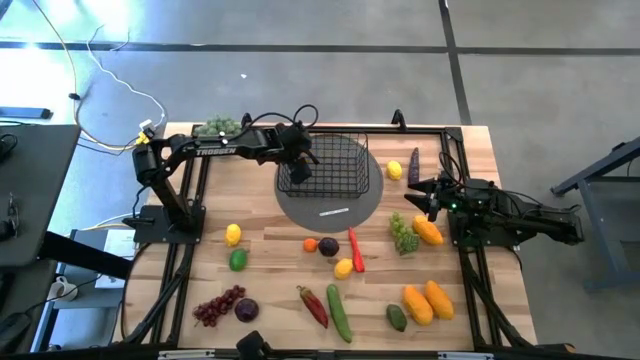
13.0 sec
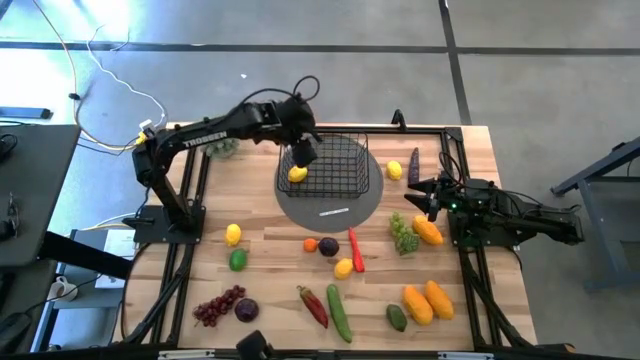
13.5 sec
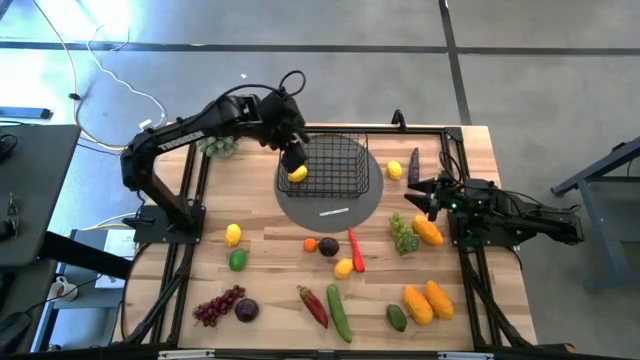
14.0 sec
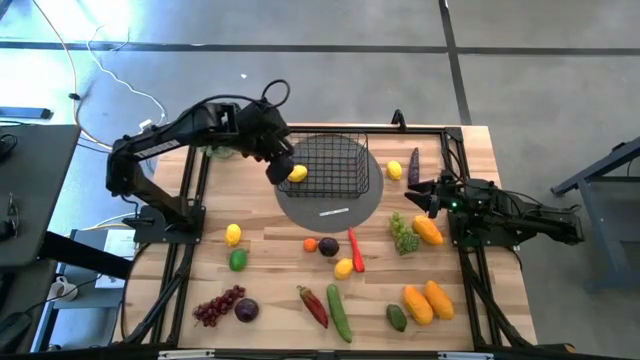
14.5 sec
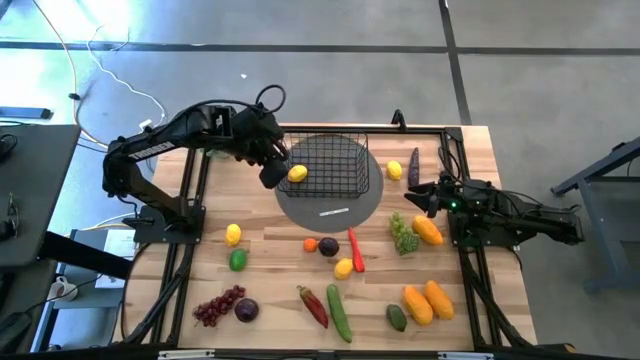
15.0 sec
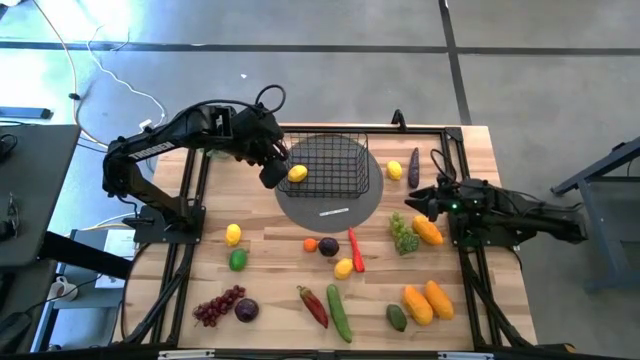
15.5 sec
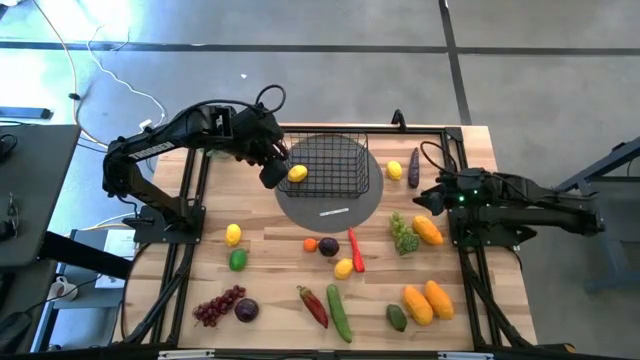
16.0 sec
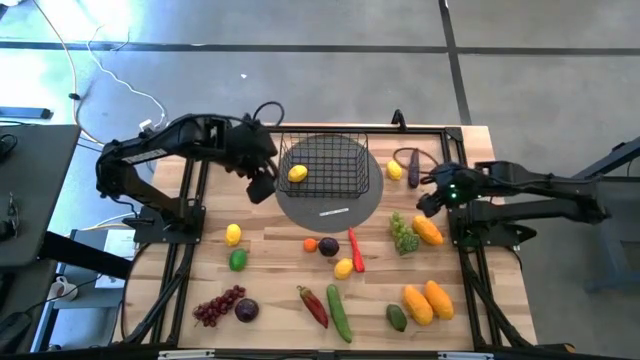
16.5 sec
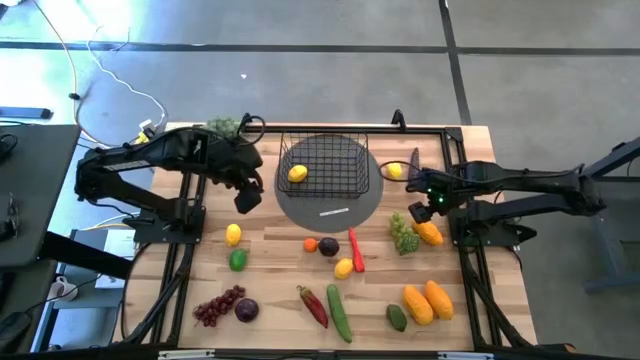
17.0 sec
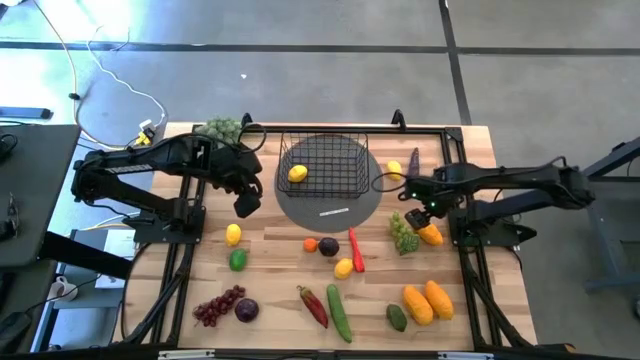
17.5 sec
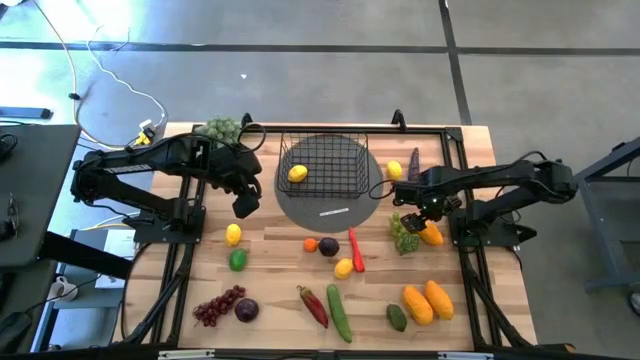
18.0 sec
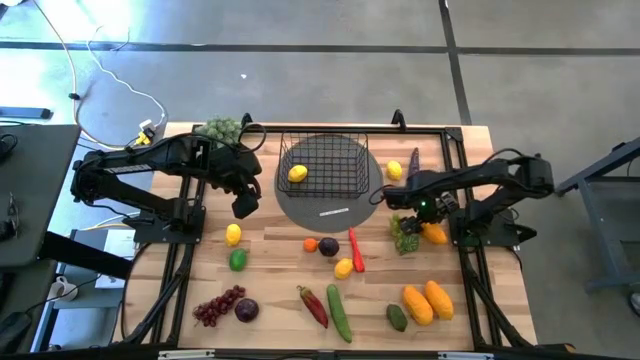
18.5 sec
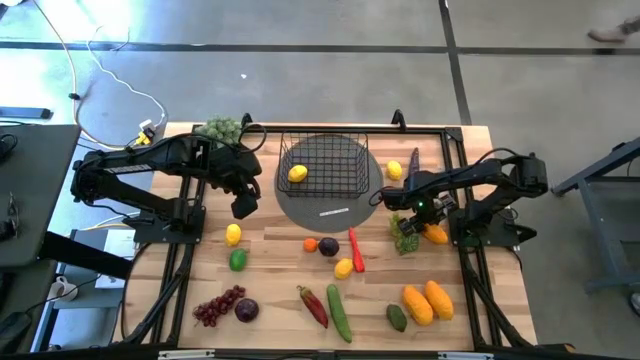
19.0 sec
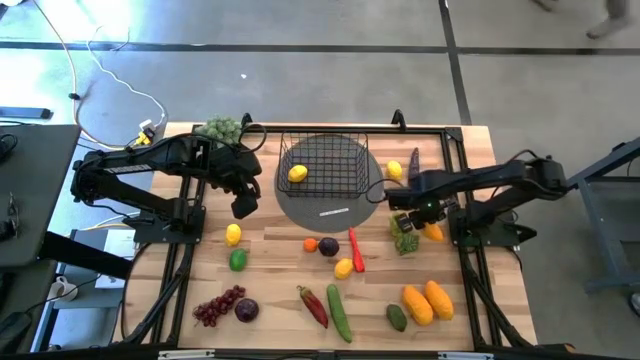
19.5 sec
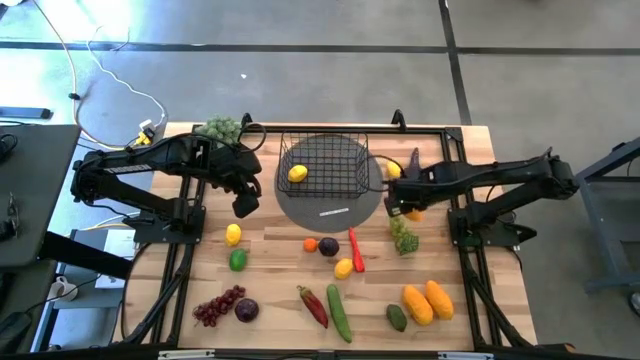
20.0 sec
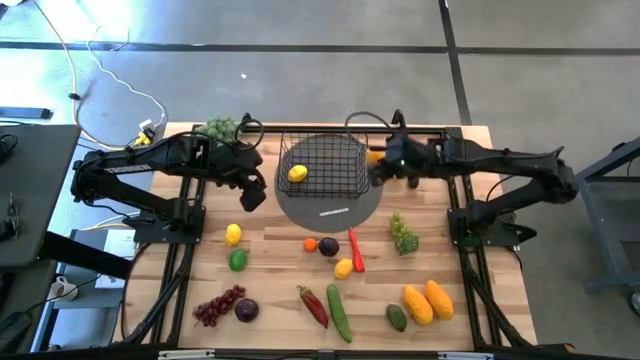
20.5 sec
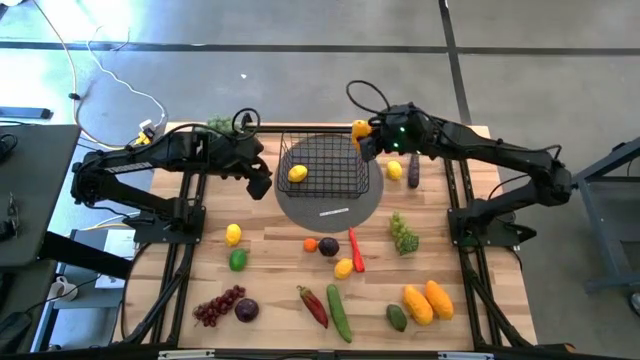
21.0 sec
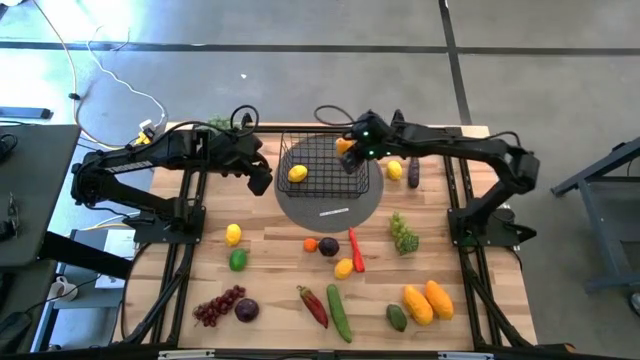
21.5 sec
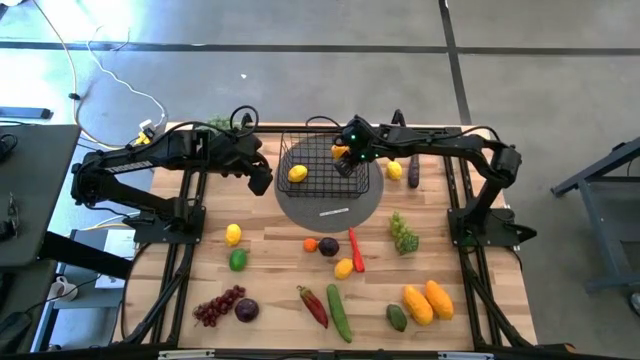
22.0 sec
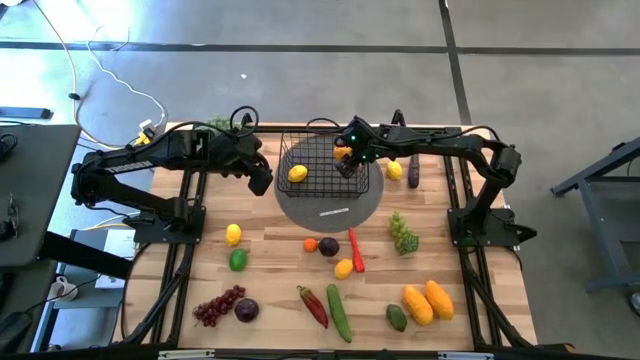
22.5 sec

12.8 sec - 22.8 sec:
Task: Build produce basket
Put the mango into the black wire basket

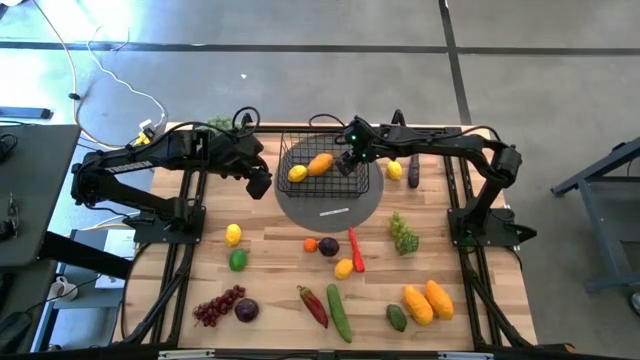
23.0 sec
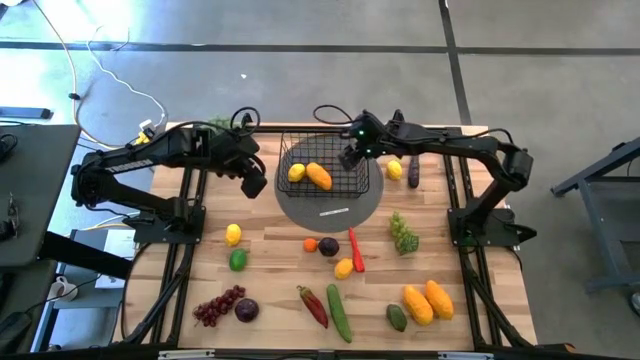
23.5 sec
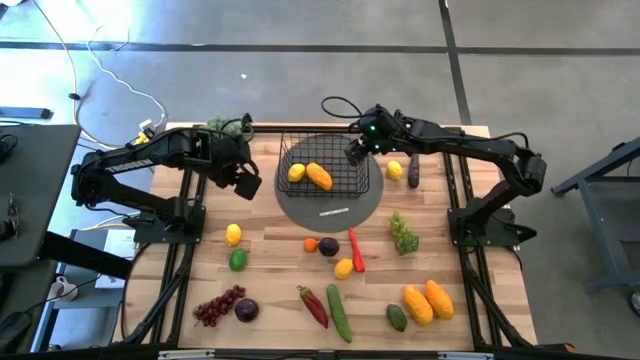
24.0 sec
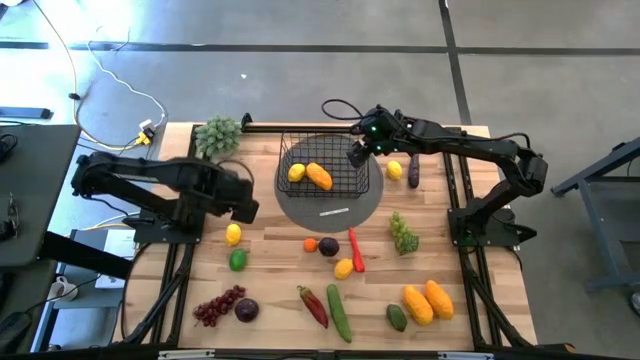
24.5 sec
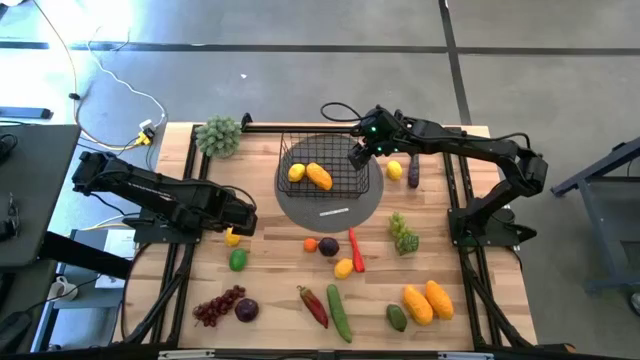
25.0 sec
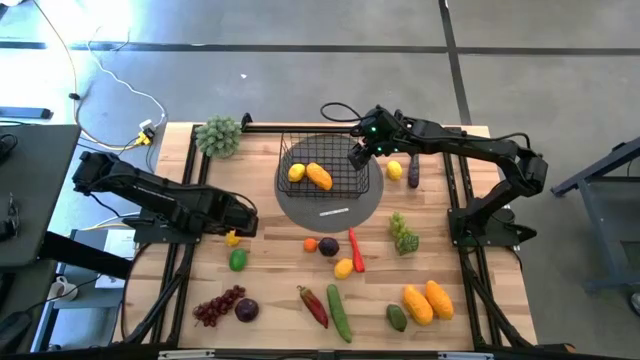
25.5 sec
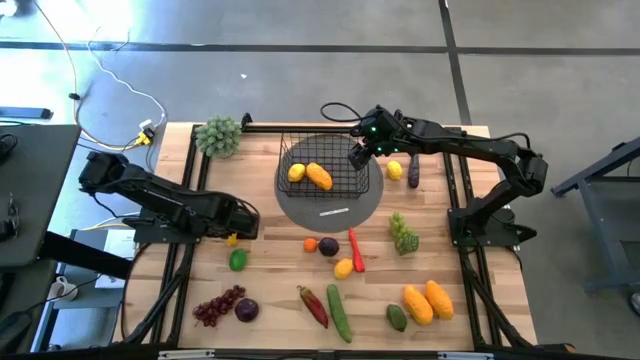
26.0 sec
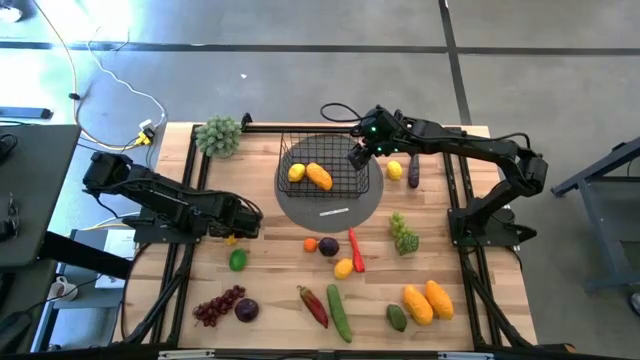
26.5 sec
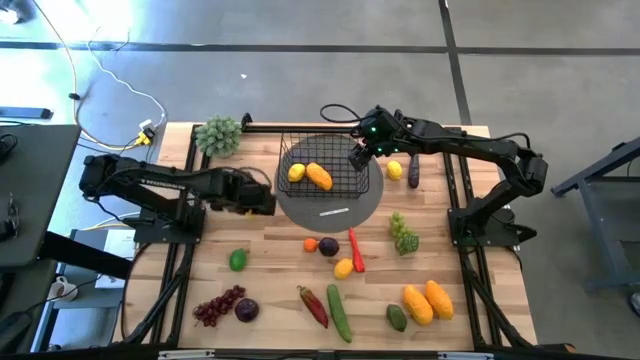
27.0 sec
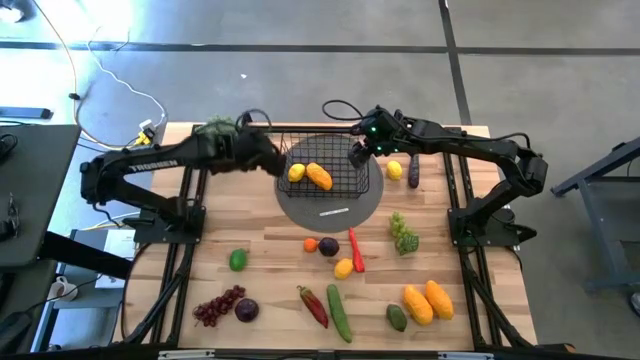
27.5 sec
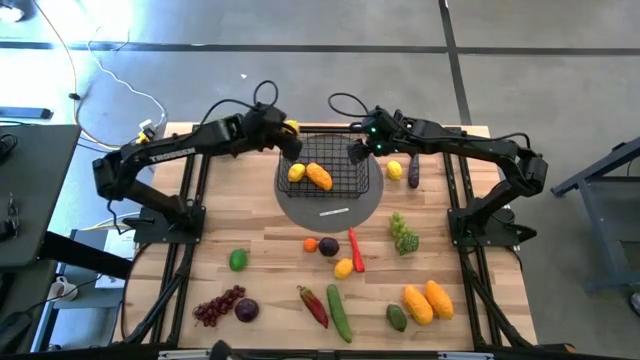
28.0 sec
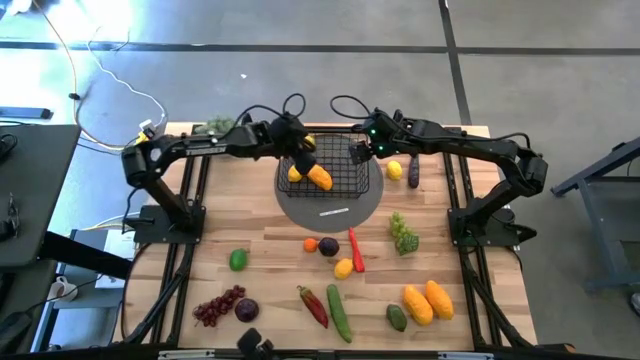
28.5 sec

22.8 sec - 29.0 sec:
Put the lemon into the black wire basket

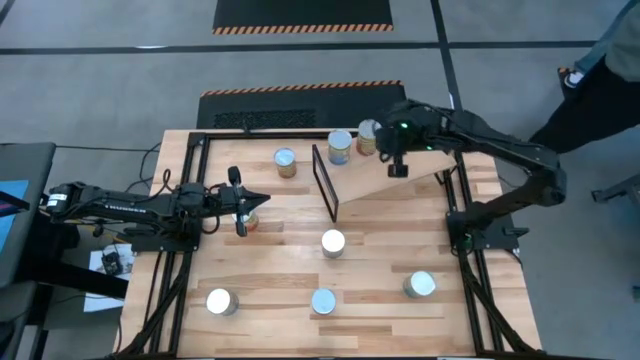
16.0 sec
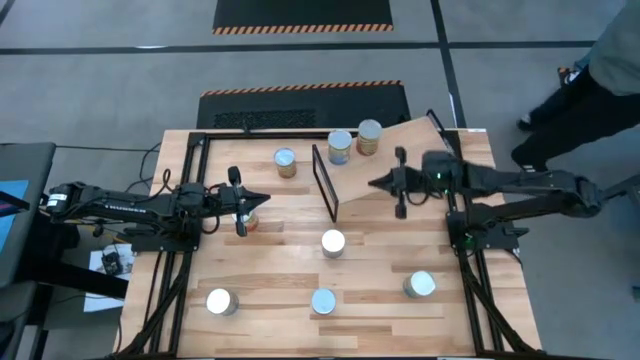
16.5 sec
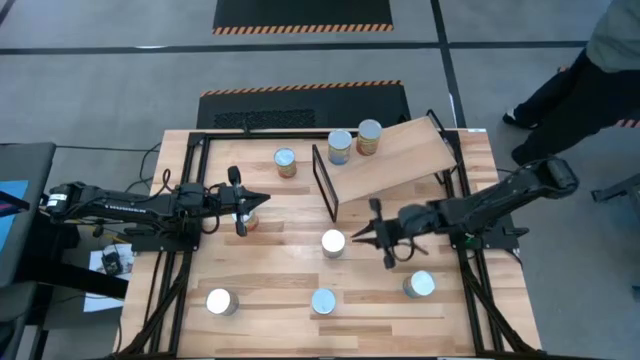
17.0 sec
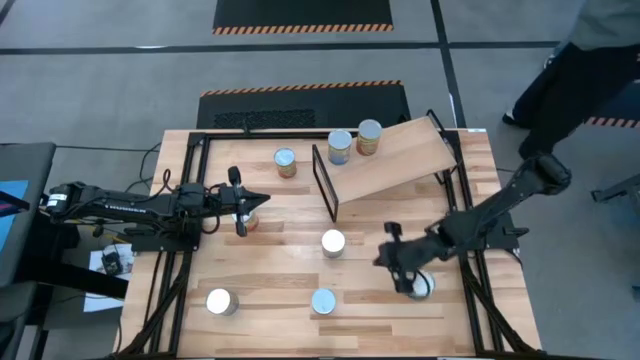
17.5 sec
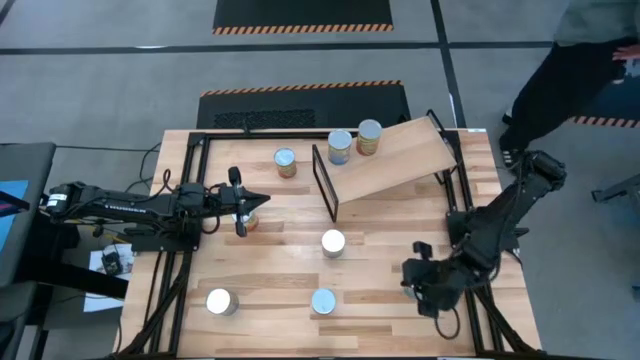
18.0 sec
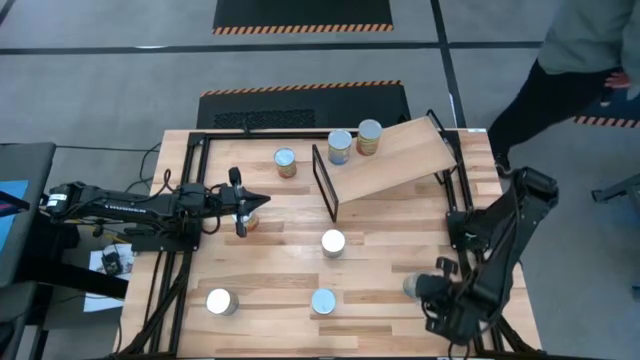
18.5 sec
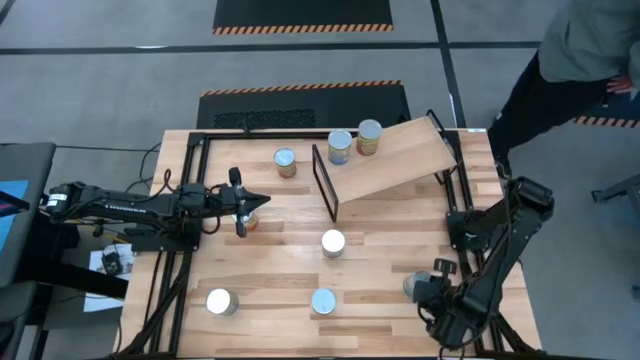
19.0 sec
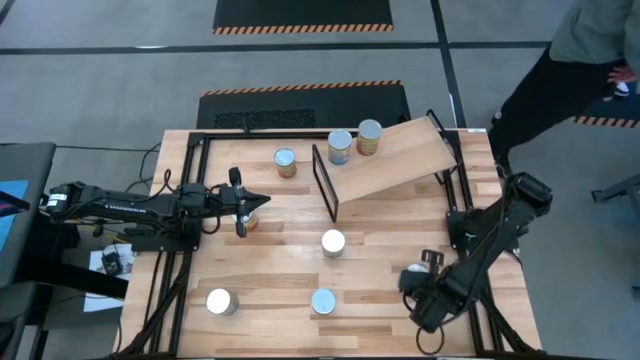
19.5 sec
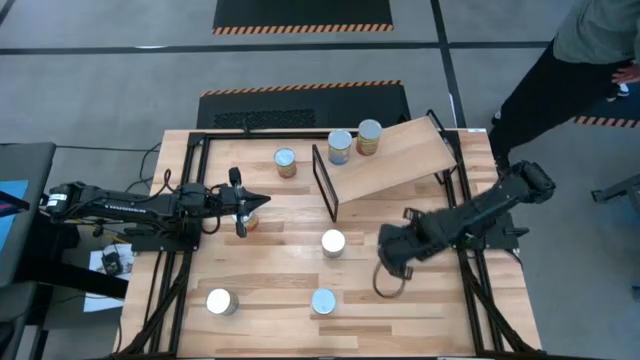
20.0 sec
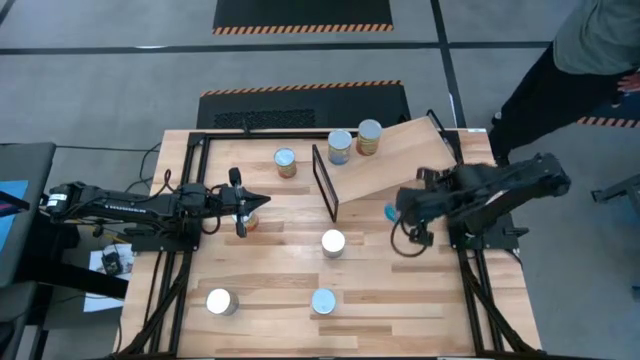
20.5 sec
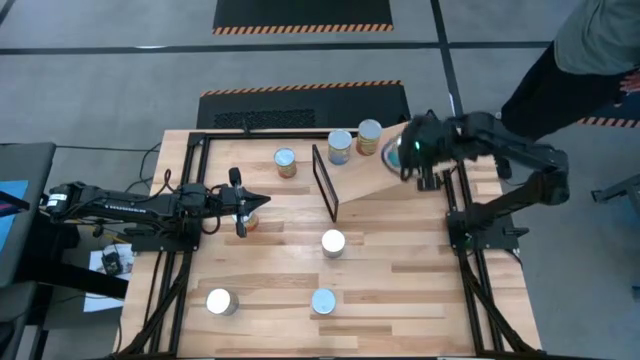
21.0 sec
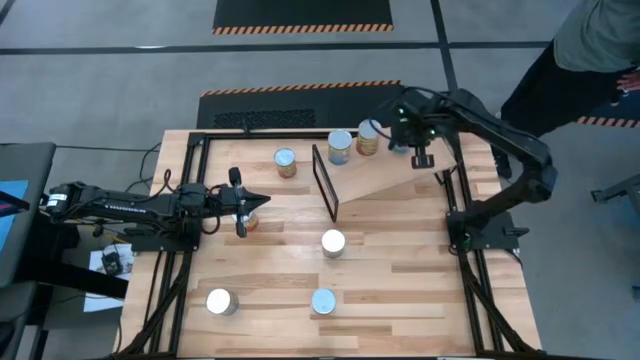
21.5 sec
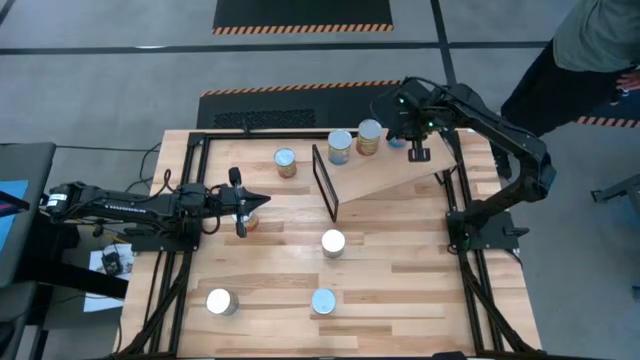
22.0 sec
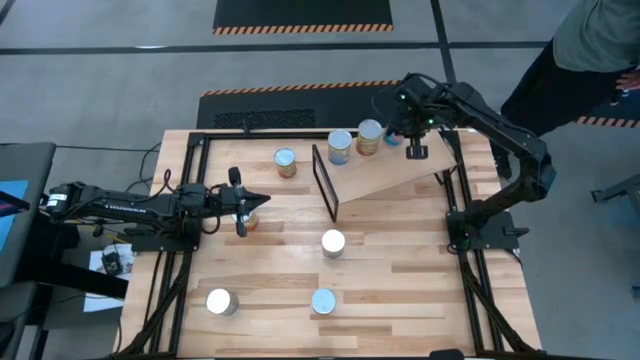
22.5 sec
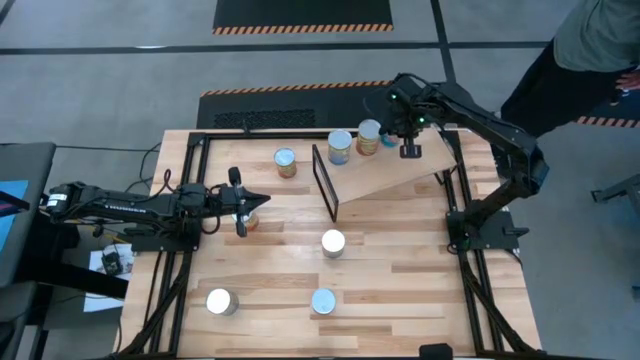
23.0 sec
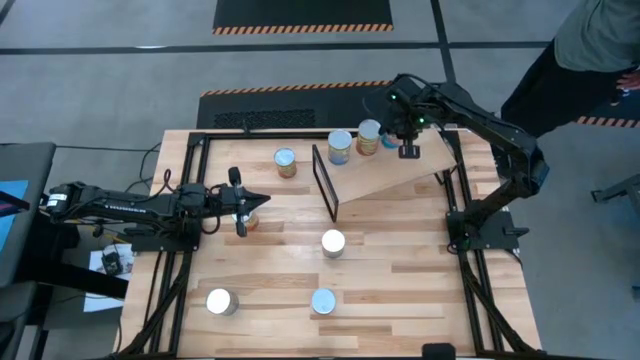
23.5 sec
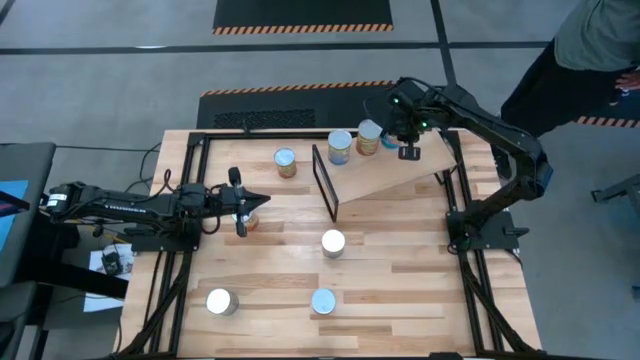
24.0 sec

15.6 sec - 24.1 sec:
Task: Pick and place cans onto a shelf
Put the right canned tomatoes on the shelf
